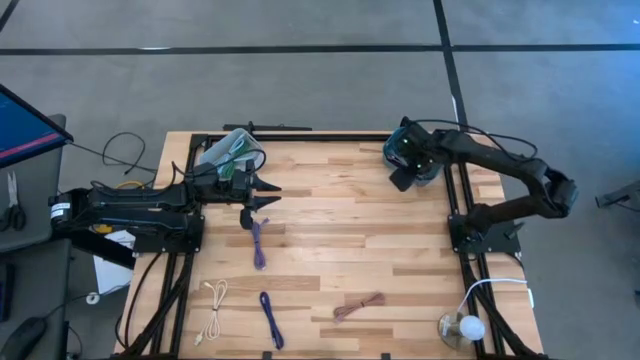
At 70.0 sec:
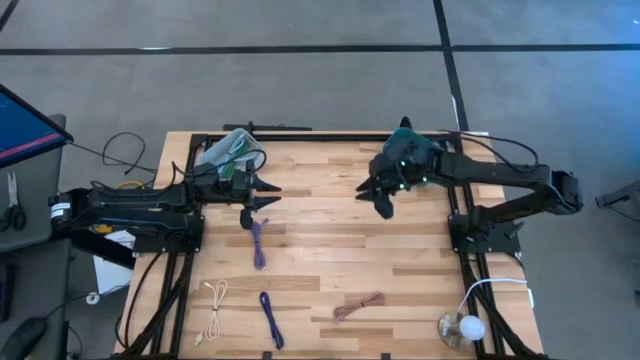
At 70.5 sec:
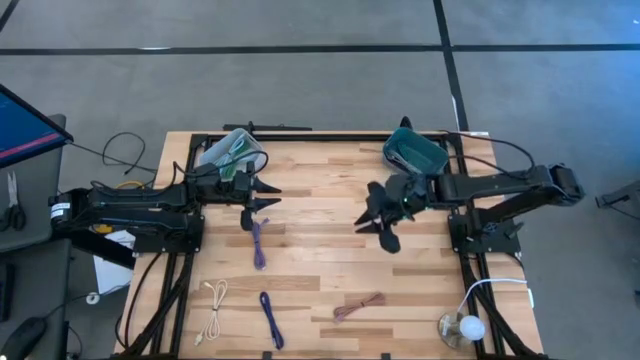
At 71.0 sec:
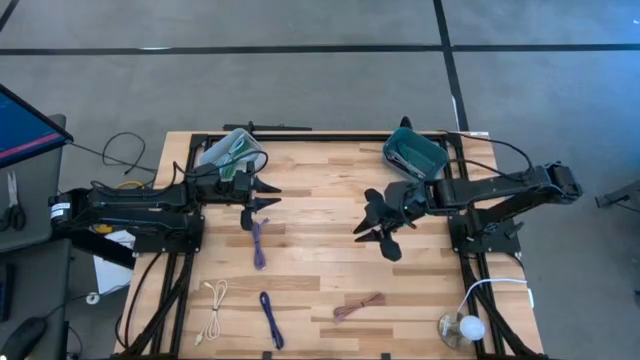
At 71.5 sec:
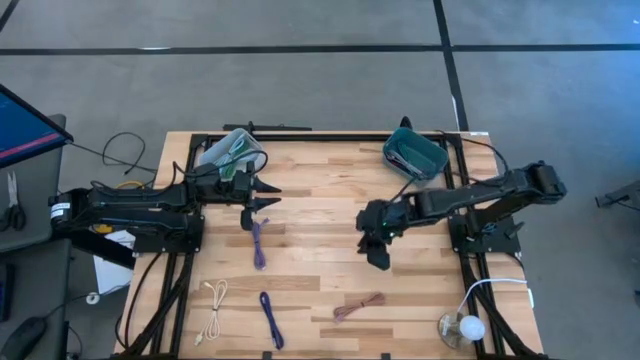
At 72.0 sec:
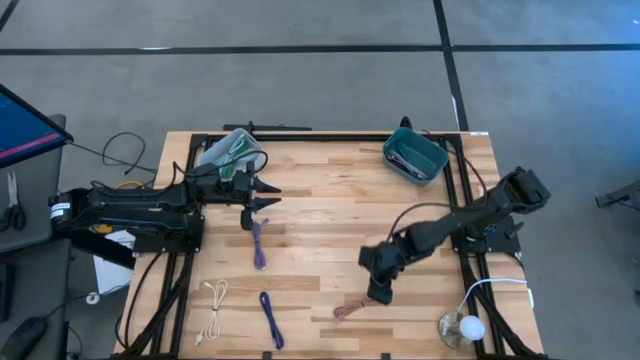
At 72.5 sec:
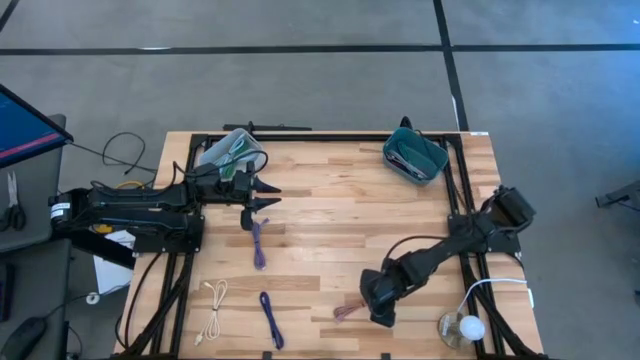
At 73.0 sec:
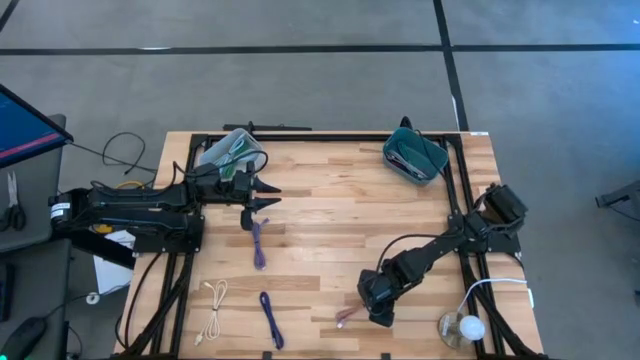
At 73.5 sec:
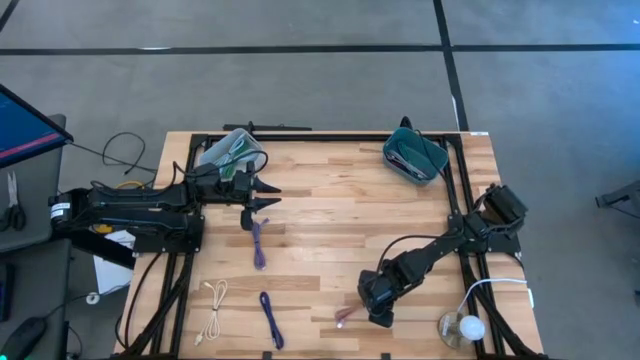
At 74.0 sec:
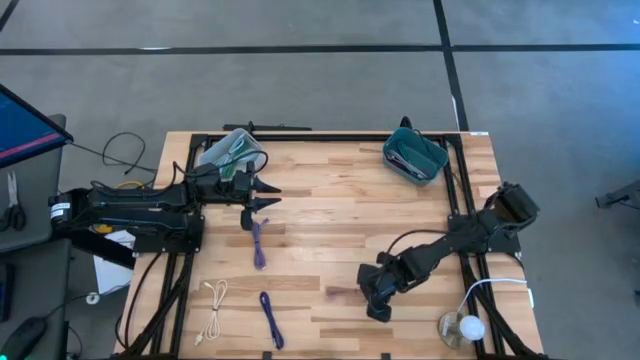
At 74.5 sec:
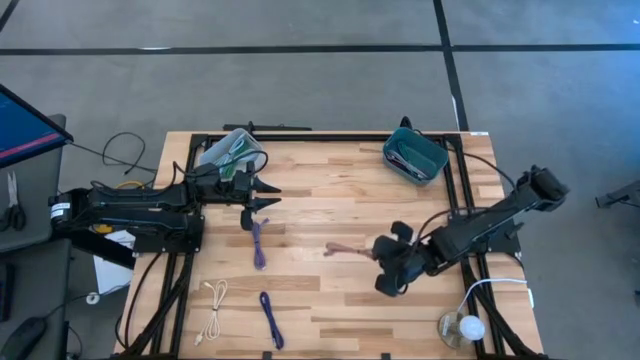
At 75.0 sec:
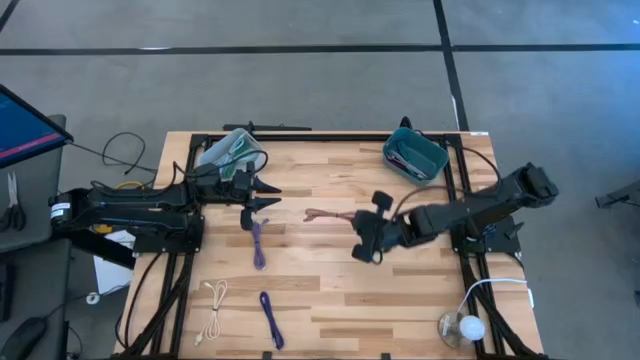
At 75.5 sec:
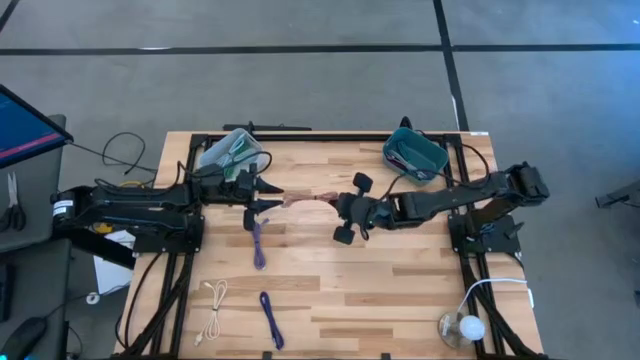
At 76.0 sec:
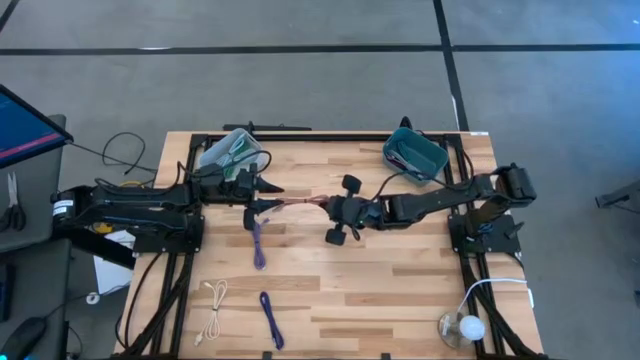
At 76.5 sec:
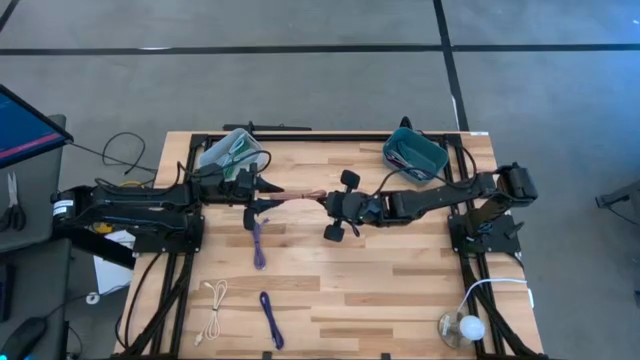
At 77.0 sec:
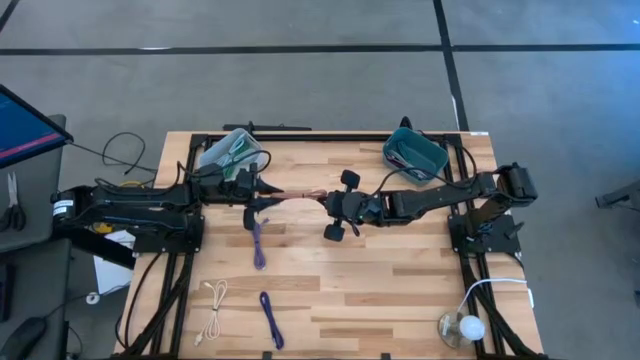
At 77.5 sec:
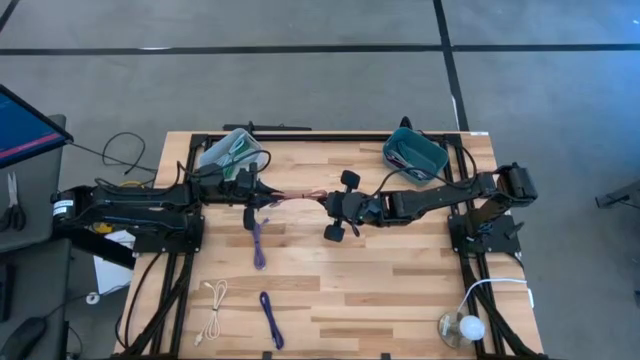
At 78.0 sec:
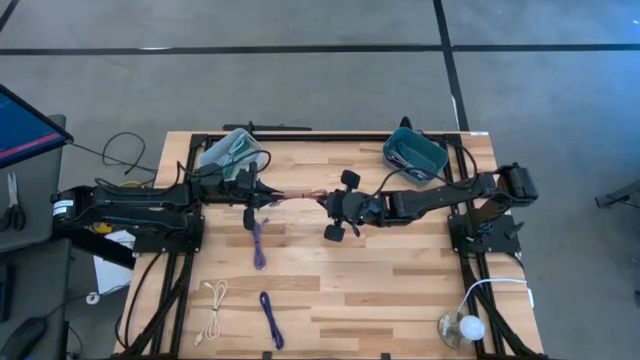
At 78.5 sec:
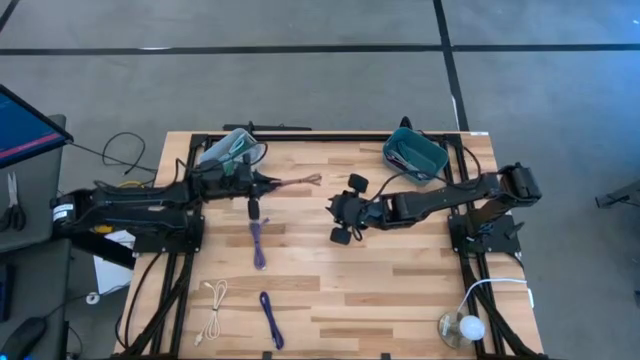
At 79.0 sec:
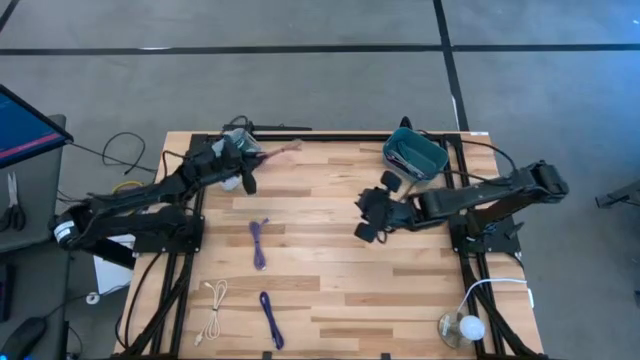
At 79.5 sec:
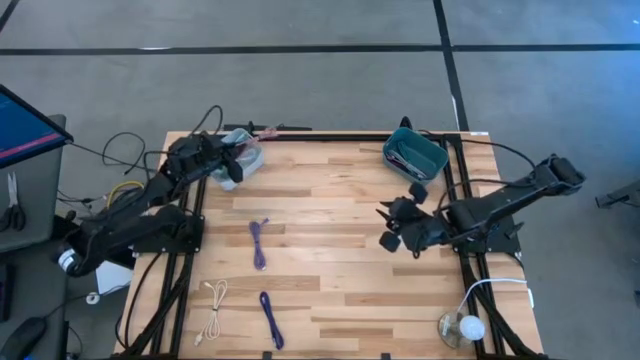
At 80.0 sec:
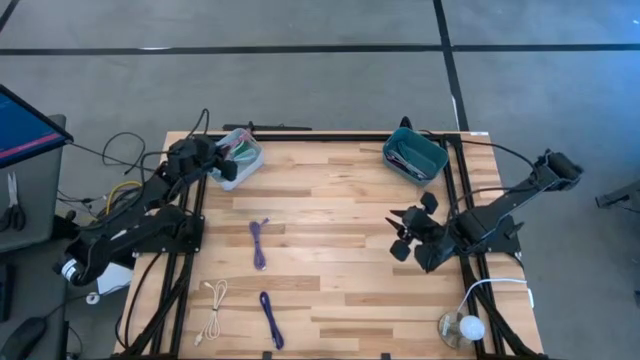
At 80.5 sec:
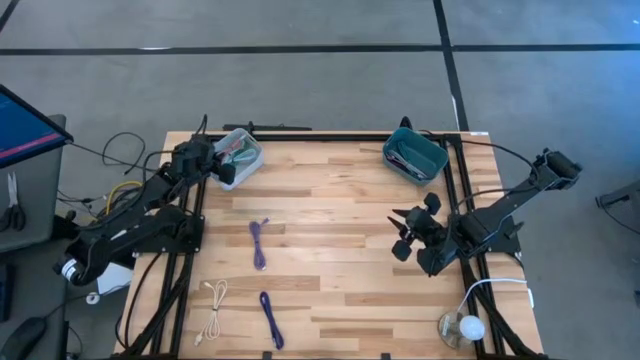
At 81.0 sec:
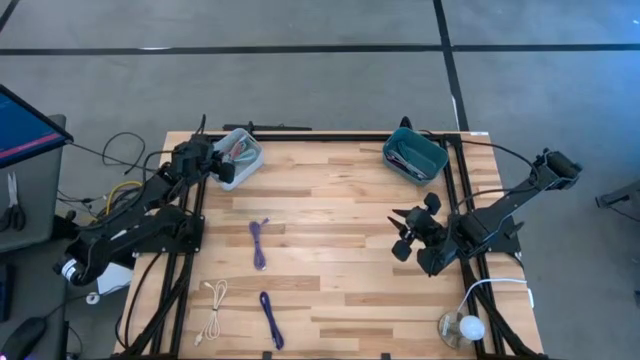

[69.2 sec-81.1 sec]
Task: Pick & Place USB Port
Put the brown charger cable into the white bin

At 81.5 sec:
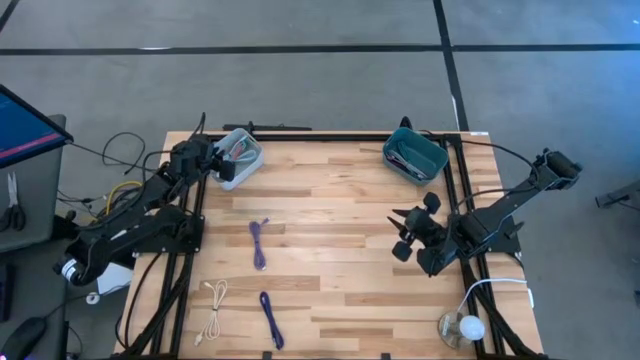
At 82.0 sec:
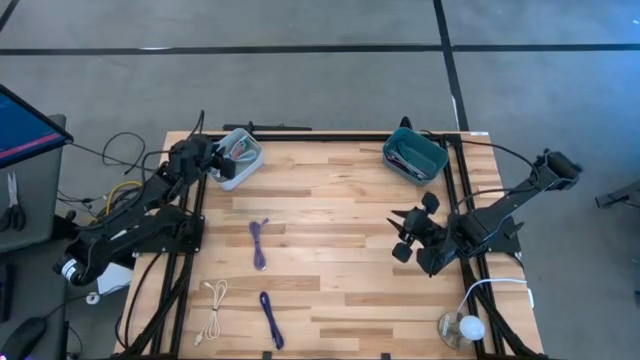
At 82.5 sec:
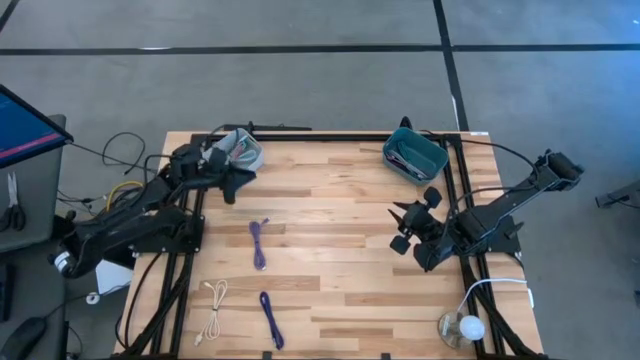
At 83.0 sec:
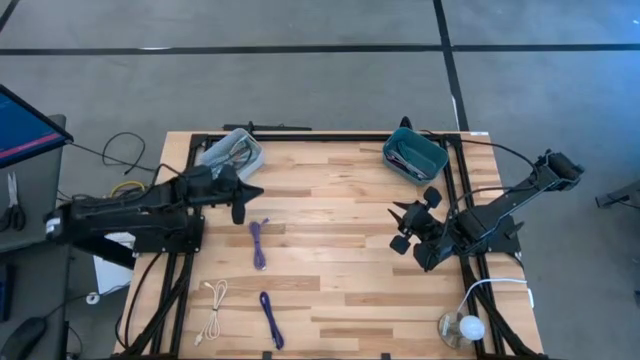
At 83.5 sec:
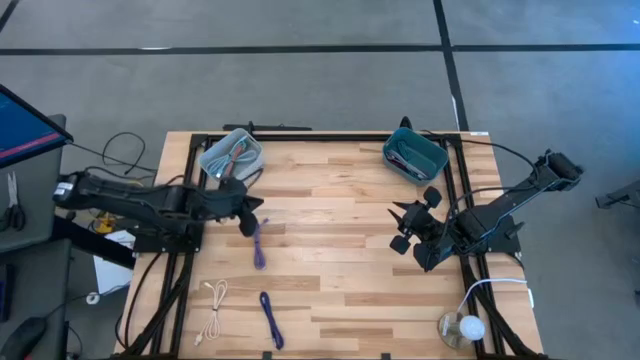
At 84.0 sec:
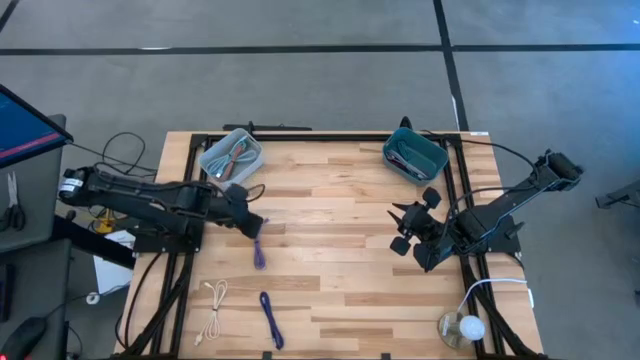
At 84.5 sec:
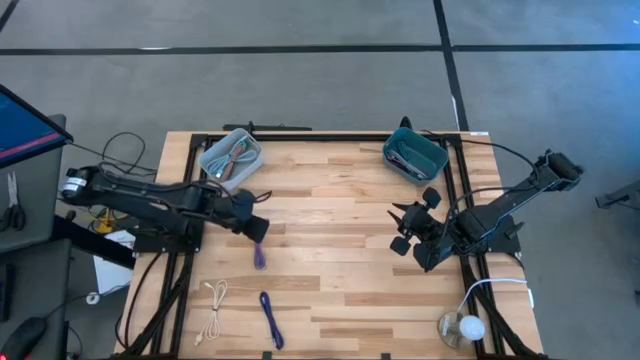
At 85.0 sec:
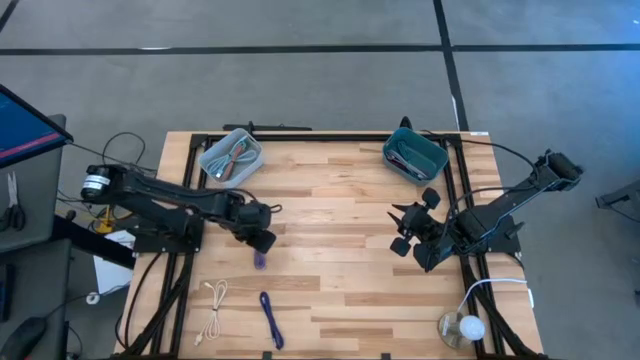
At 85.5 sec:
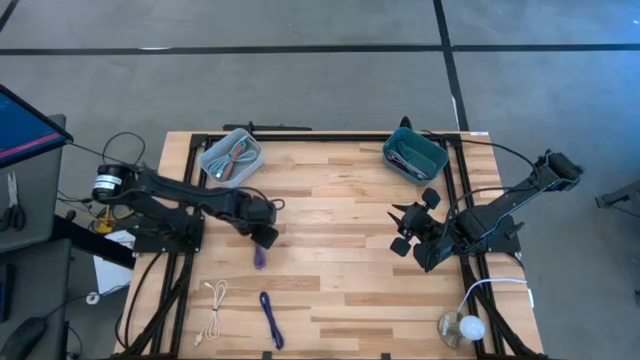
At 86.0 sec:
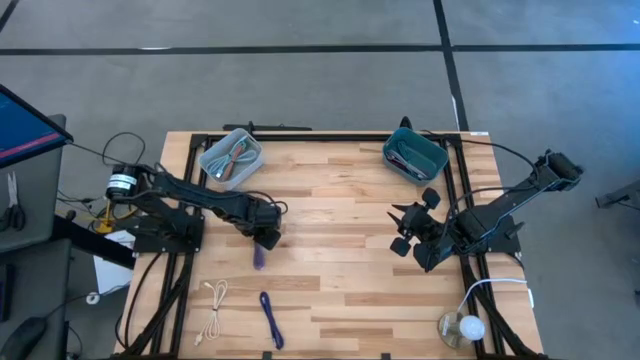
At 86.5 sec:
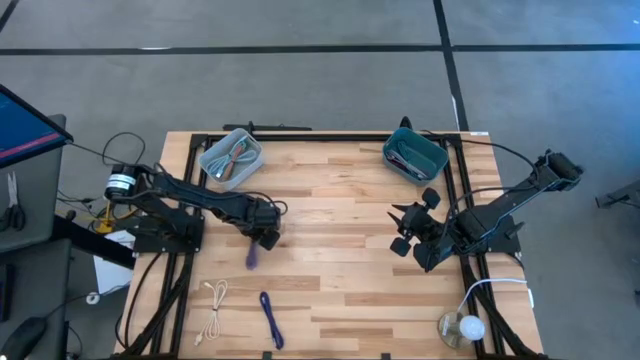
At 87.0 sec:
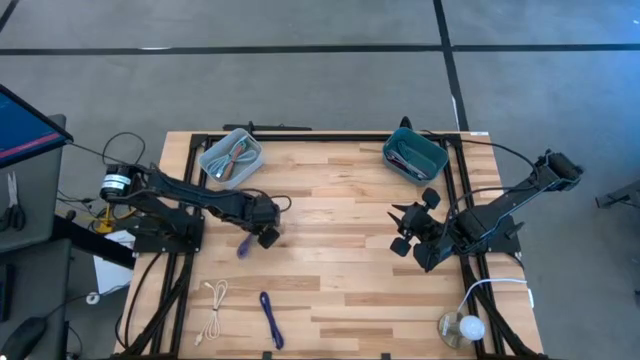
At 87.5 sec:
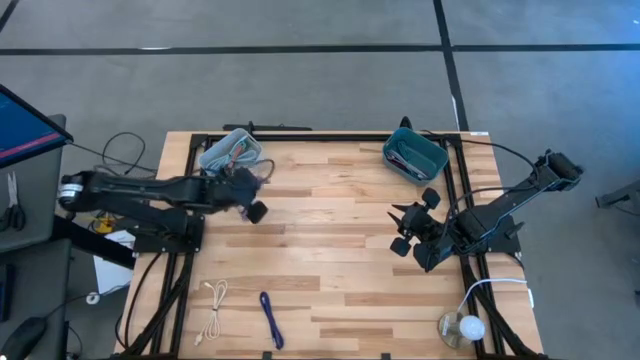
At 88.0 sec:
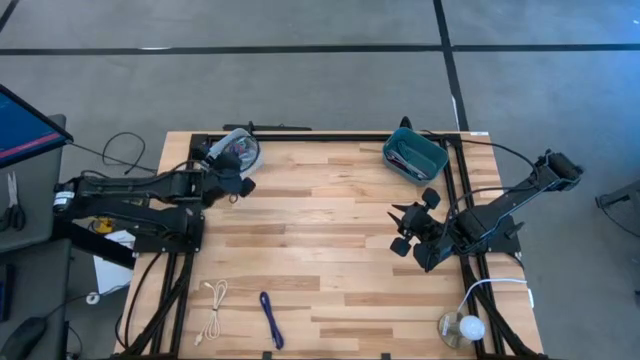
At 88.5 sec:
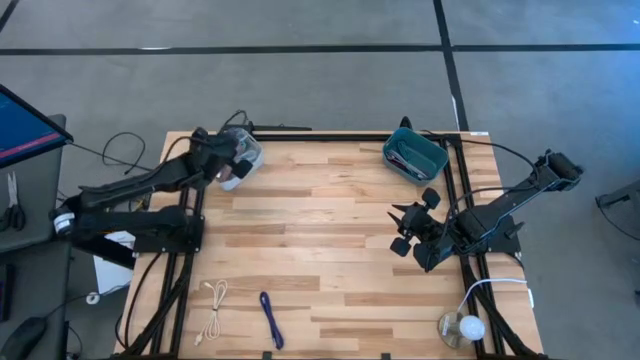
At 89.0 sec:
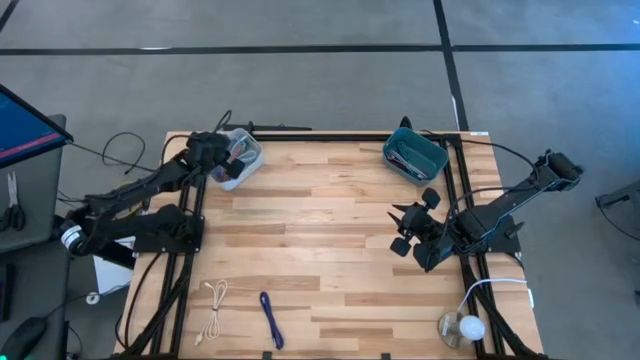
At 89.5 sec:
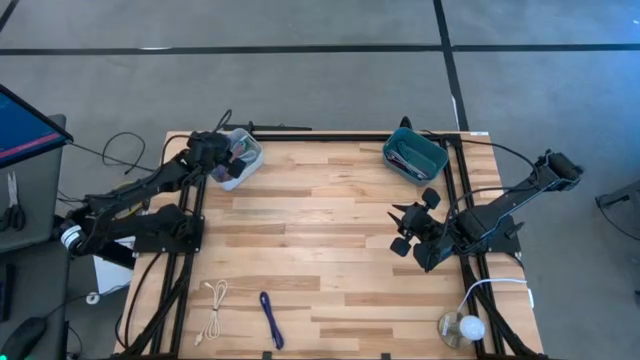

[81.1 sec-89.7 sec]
Put the light violet charger cable into the white bin

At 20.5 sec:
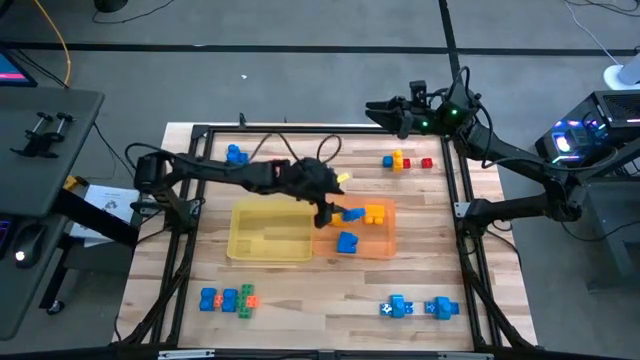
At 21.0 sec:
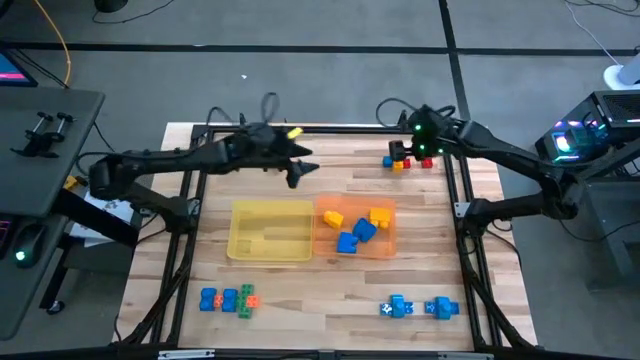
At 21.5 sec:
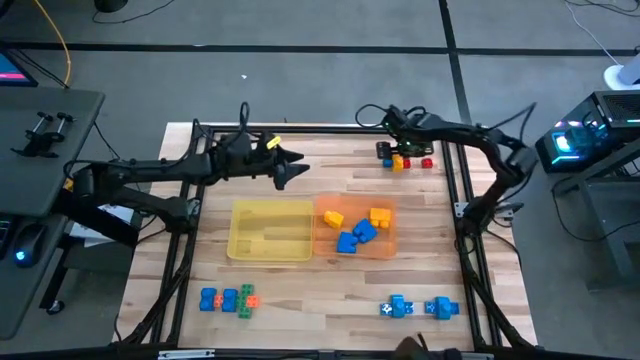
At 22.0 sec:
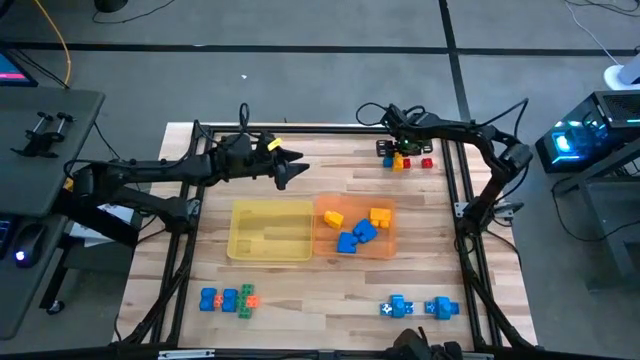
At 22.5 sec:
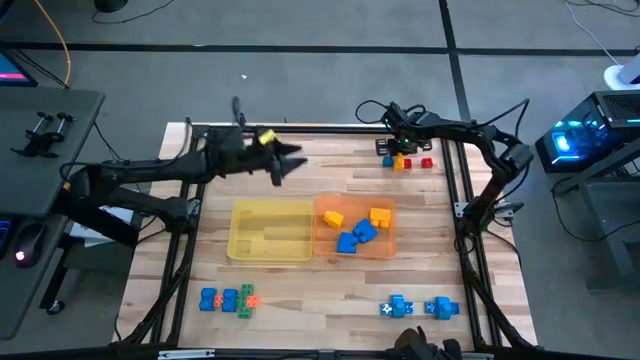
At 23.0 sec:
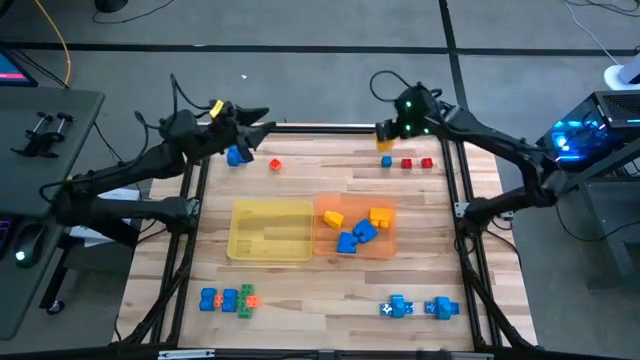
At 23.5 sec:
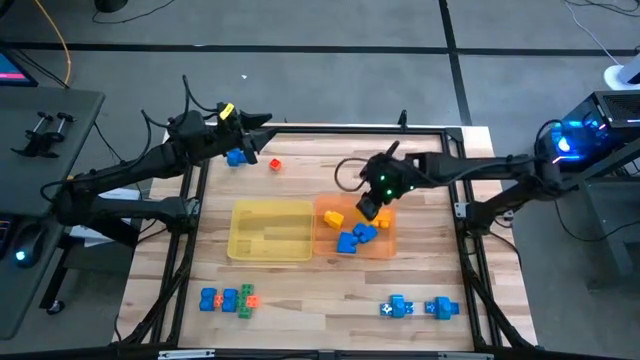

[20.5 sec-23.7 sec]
Task: Sort blocks by size
Put the large yellow game piece into the orange bin
